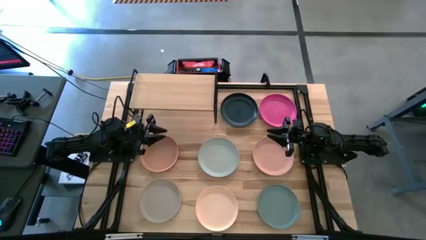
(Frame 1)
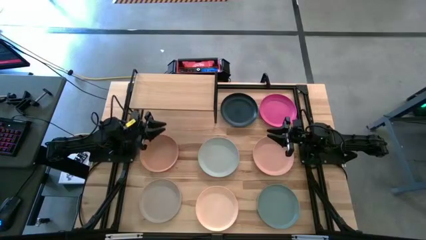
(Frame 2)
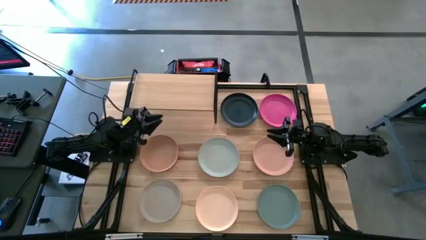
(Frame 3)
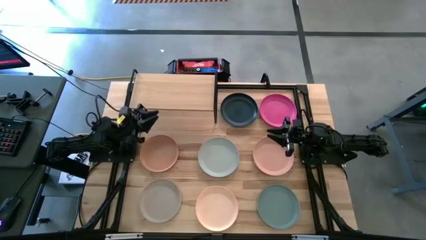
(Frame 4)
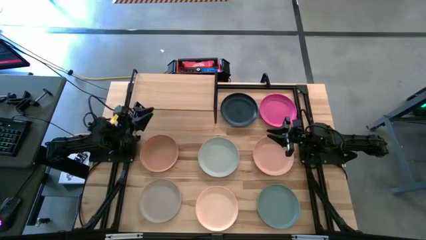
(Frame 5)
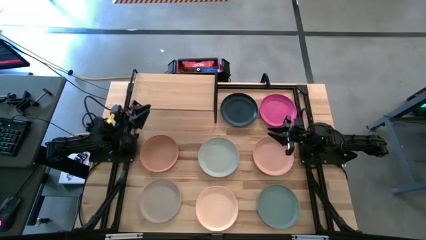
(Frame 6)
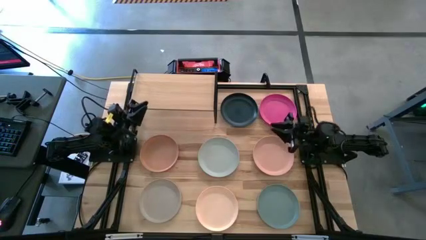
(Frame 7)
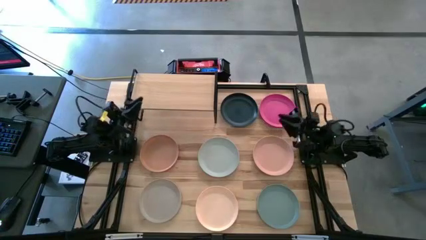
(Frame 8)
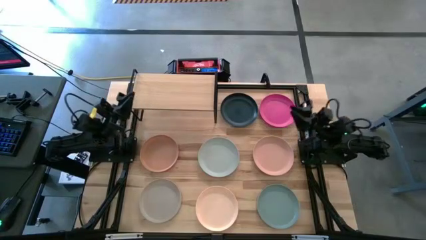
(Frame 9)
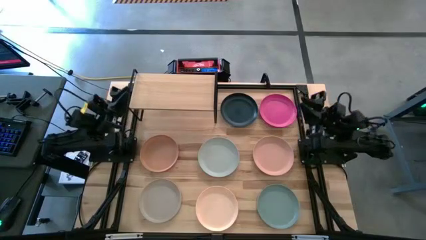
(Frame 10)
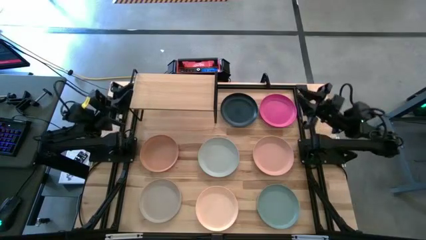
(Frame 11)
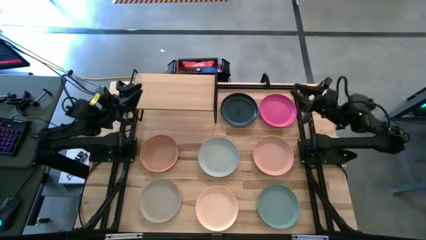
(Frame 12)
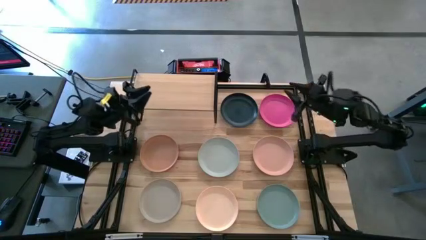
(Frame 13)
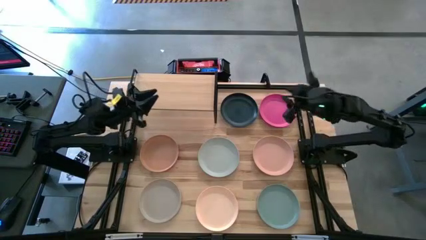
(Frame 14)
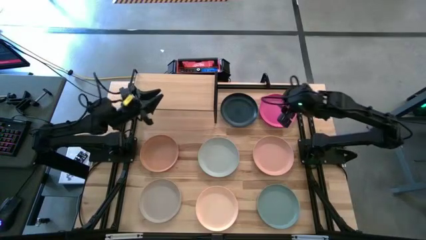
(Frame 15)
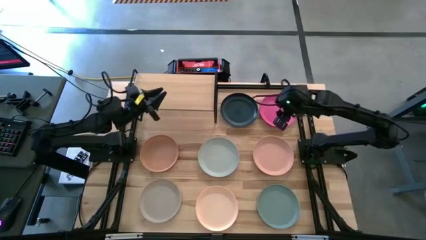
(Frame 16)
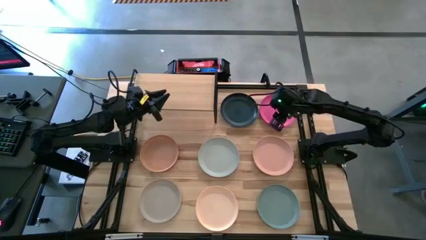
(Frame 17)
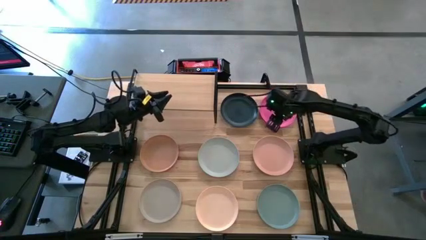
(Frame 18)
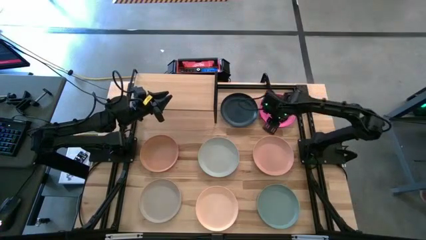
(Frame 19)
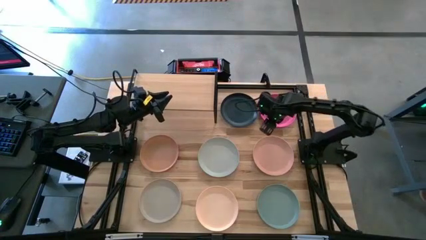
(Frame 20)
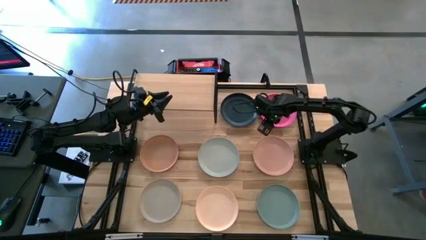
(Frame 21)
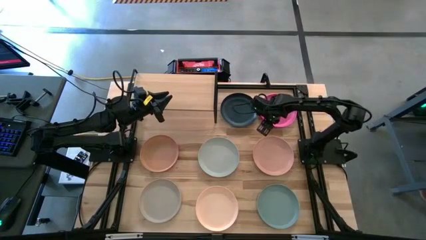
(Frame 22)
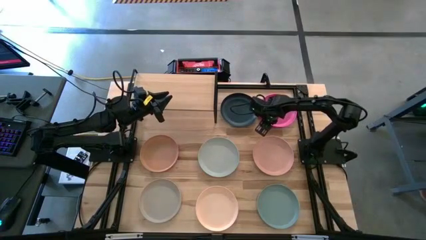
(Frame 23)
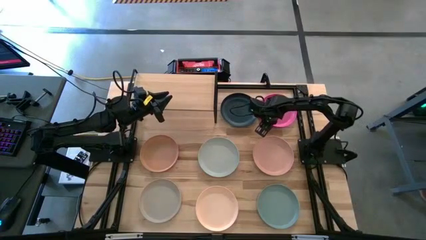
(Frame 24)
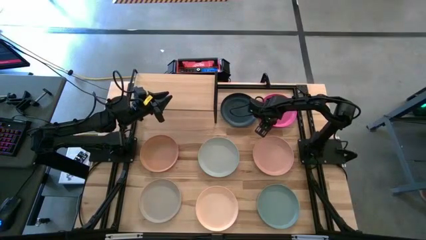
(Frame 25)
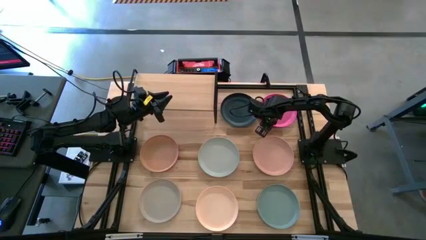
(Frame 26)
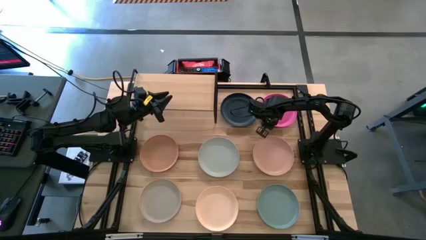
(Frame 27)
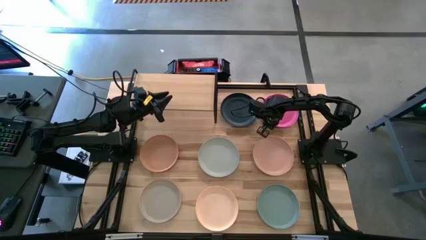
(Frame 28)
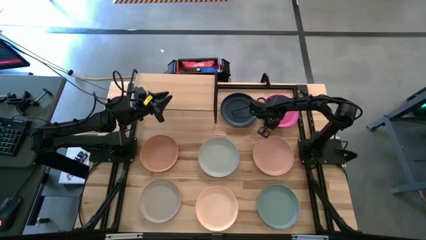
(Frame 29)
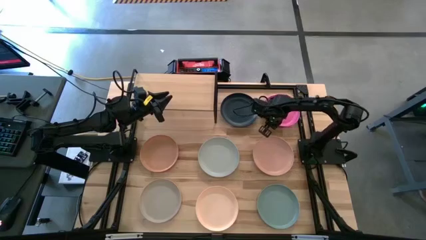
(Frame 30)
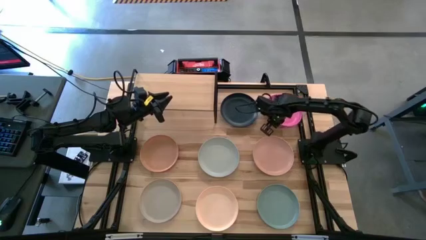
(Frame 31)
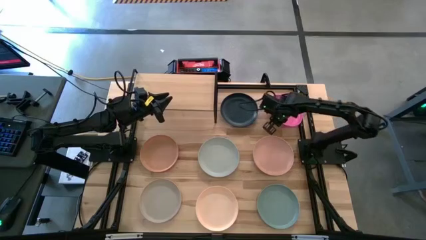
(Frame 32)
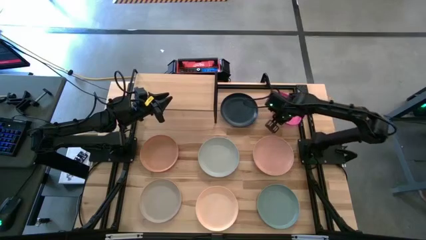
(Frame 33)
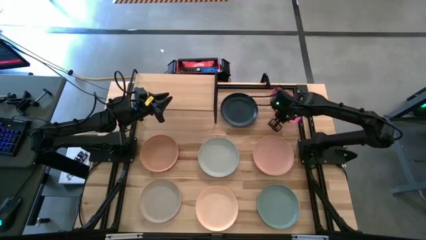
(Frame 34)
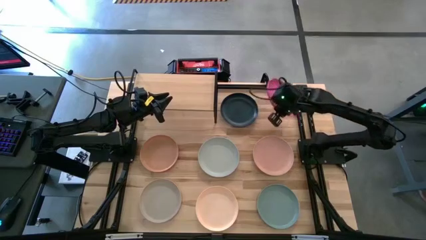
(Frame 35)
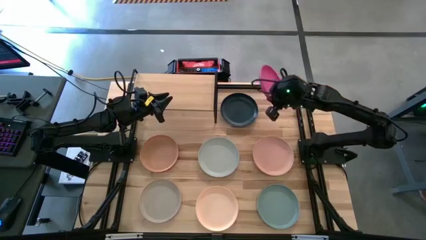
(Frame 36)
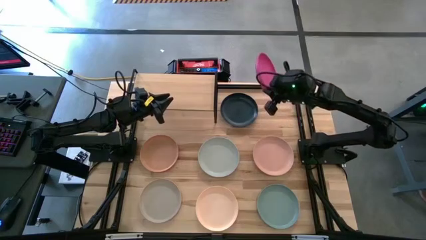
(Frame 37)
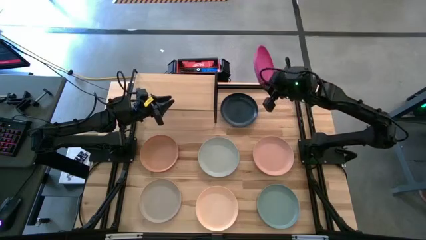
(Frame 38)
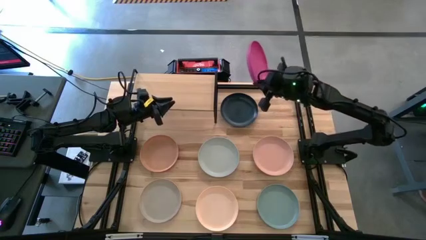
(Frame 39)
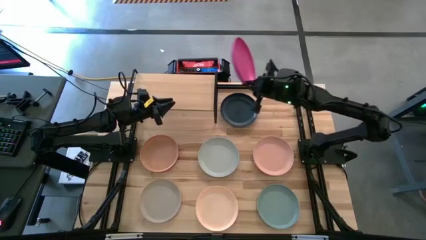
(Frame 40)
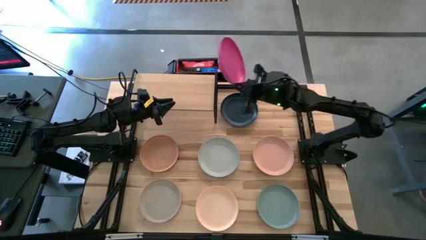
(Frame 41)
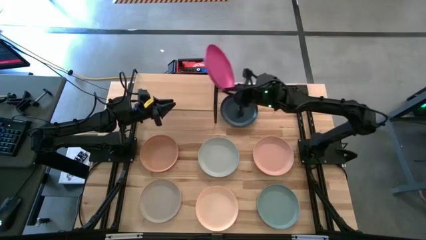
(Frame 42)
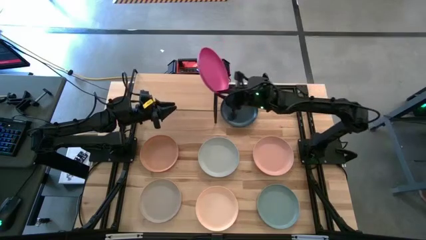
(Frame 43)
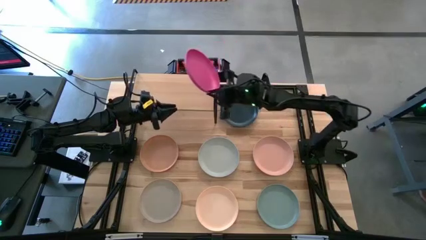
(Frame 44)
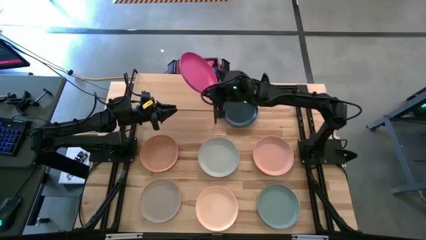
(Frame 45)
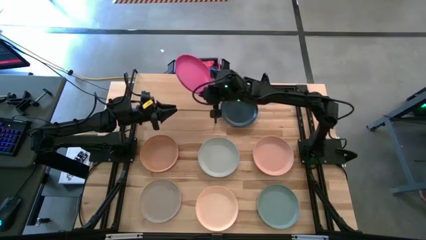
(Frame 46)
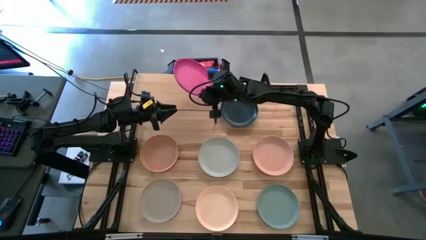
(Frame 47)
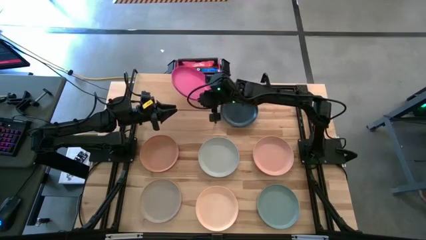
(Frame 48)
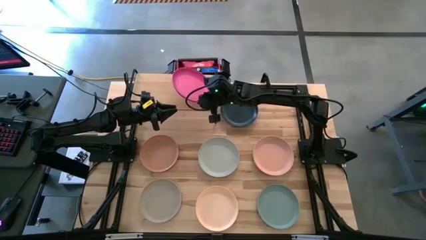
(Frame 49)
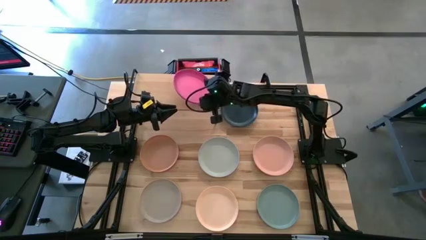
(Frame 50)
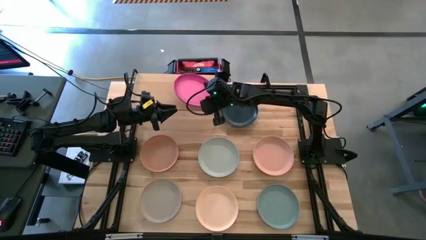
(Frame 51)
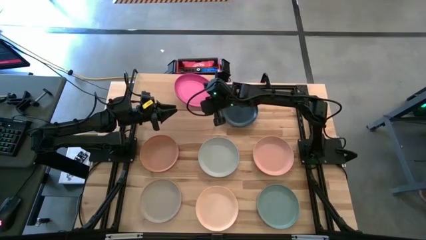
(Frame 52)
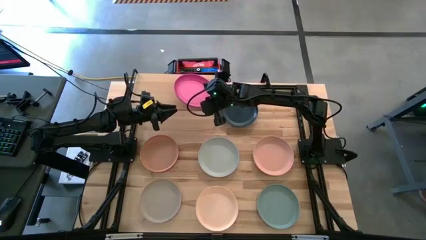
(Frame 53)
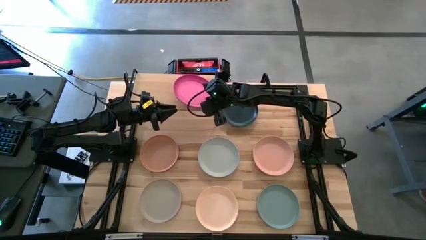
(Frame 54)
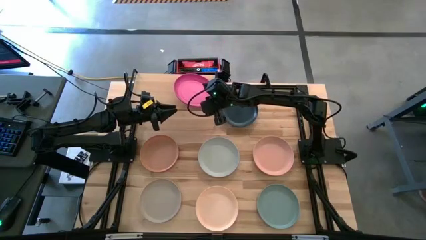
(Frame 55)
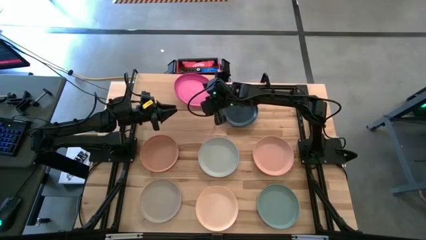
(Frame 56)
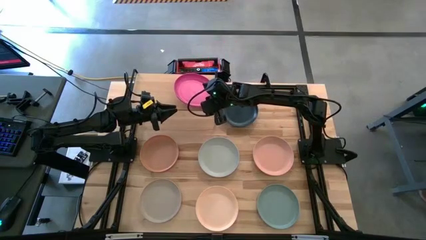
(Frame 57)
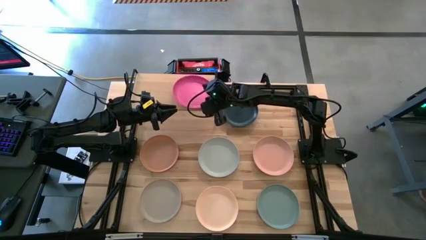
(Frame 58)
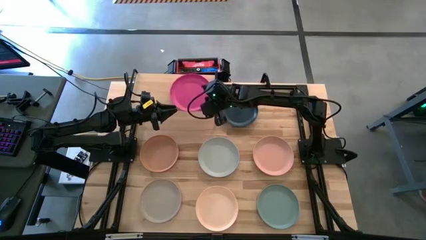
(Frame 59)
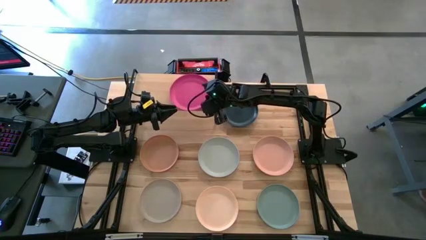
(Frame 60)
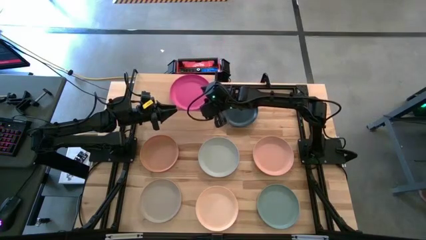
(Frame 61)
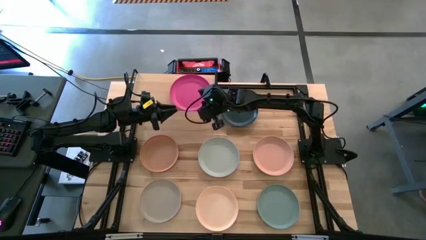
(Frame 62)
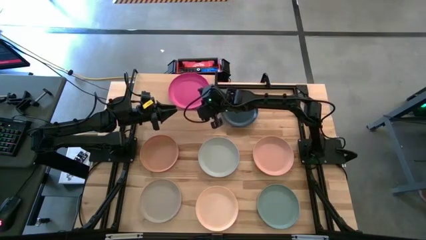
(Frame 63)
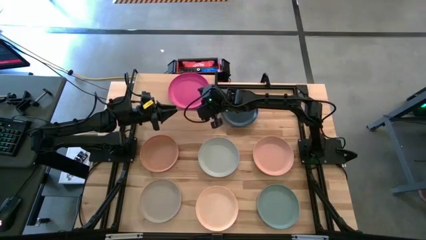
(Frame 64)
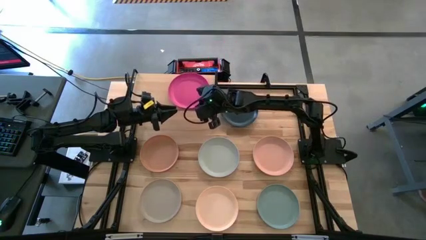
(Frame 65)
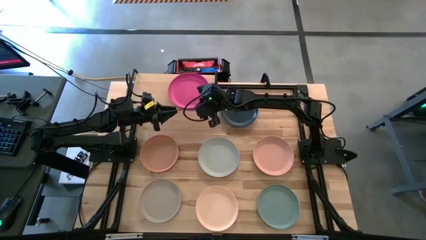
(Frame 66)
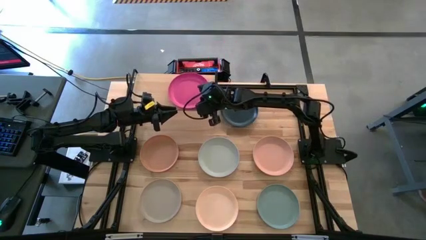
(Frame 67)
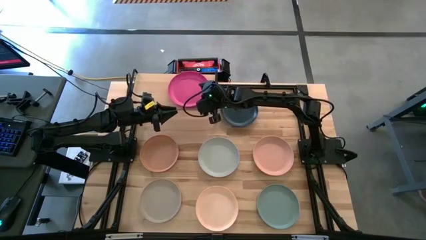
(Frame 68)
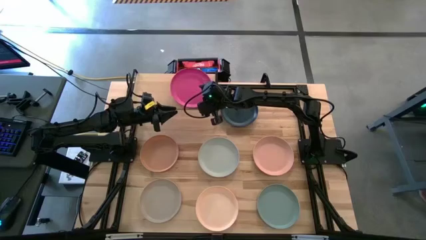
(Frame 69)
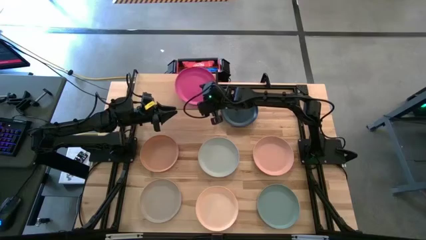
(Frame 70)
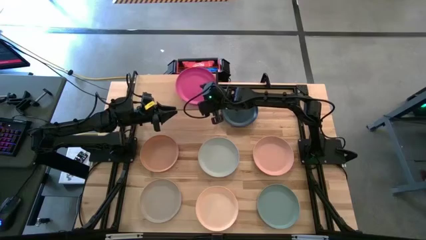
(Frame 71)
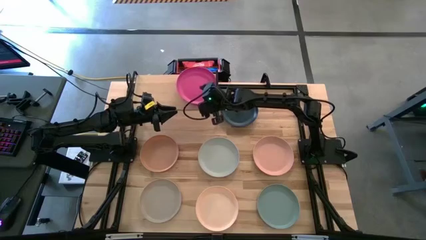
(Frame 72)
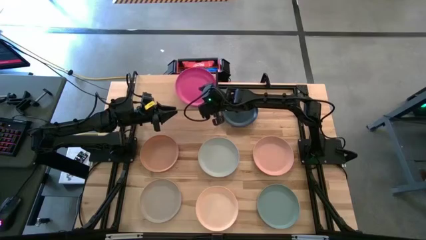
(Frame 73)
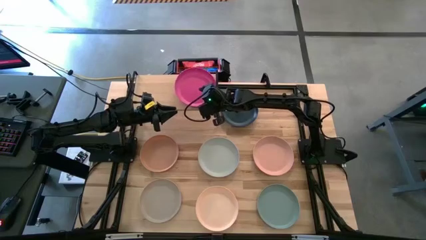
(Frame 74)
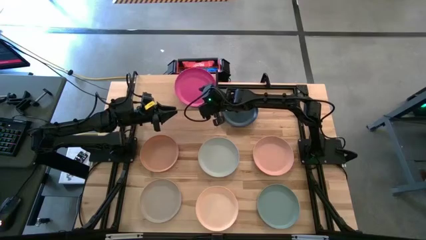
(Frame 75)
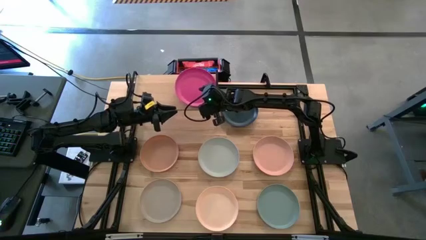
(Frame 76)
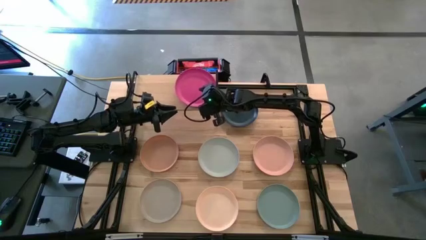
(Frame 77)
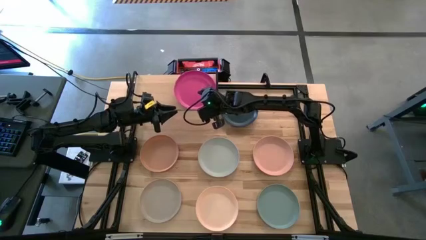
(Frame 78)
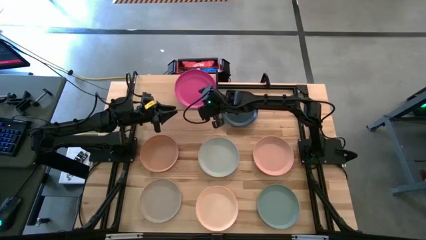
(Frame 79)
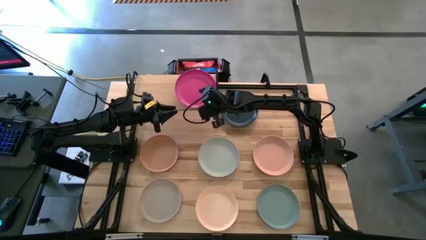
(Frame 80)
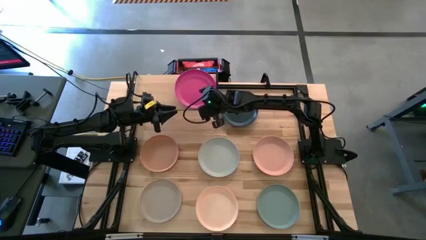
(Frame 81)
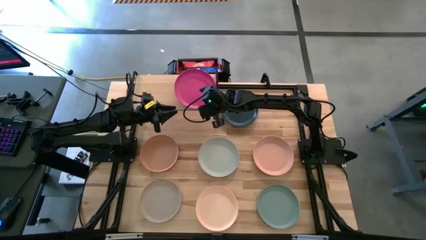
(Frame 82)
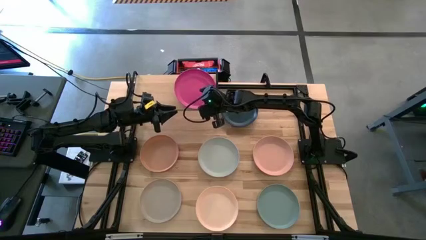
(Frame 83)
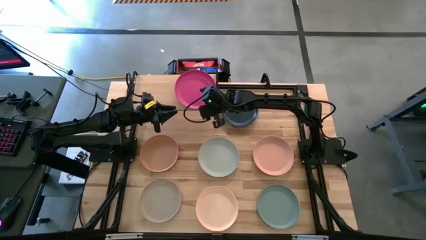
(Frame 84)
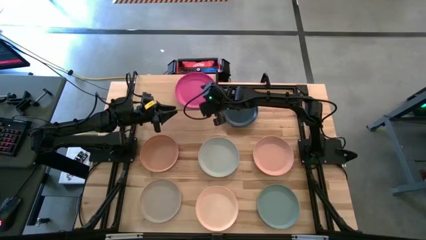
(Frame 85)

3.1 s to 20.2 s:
Task: Place and stack plates onto a shelf
Put the pink plate on the shelf
